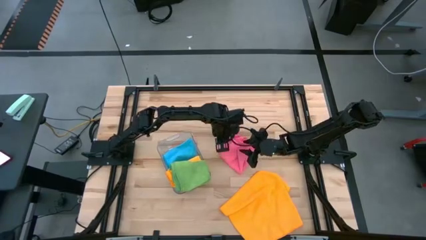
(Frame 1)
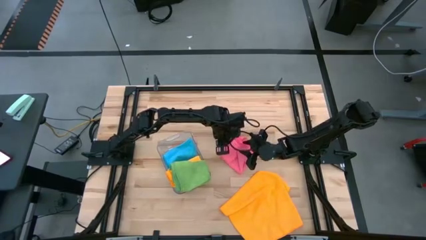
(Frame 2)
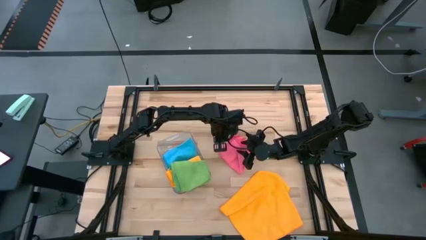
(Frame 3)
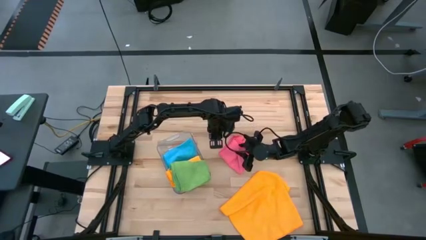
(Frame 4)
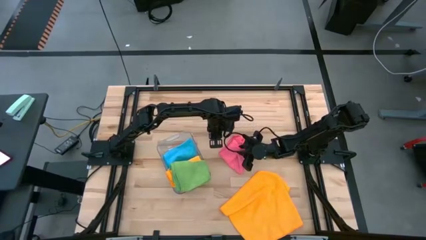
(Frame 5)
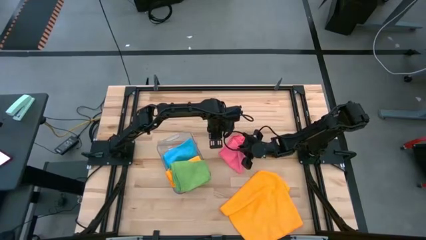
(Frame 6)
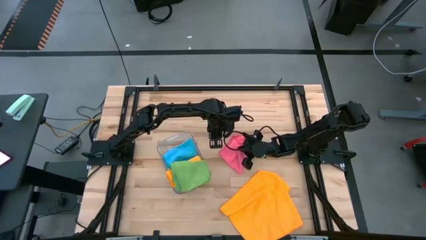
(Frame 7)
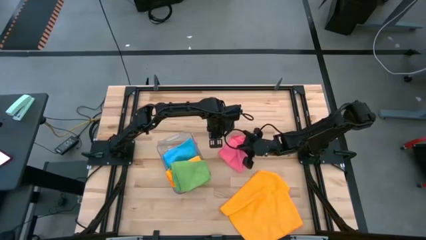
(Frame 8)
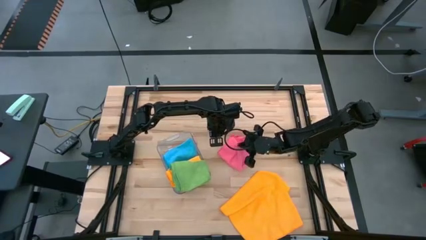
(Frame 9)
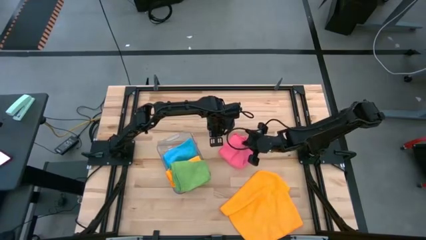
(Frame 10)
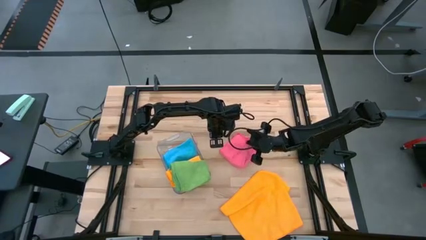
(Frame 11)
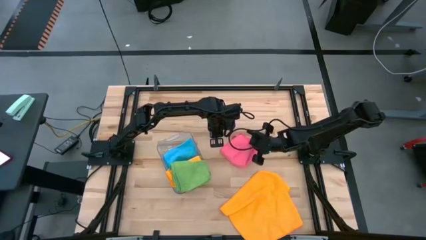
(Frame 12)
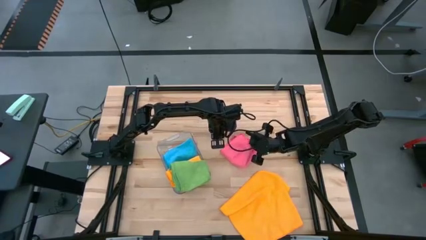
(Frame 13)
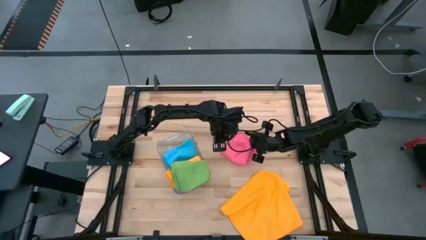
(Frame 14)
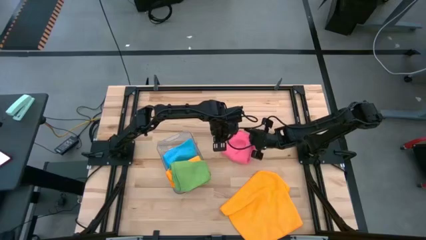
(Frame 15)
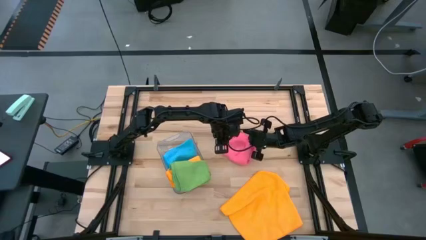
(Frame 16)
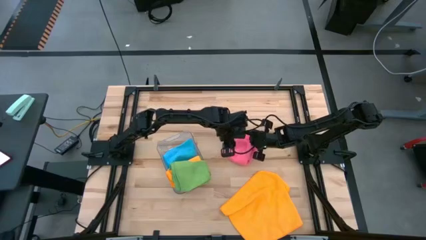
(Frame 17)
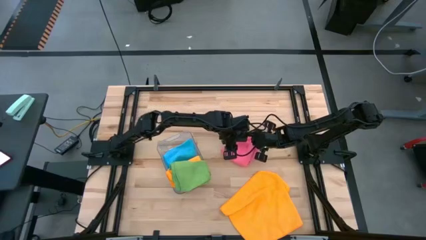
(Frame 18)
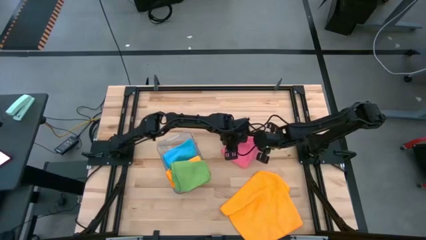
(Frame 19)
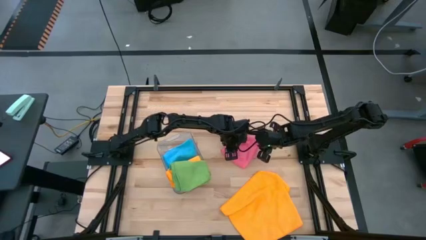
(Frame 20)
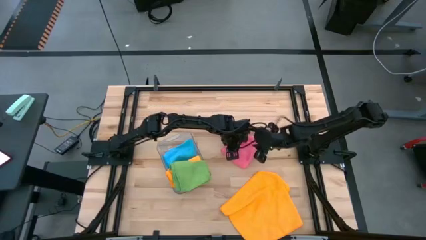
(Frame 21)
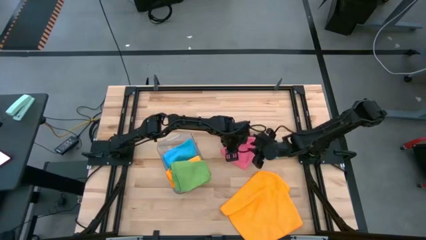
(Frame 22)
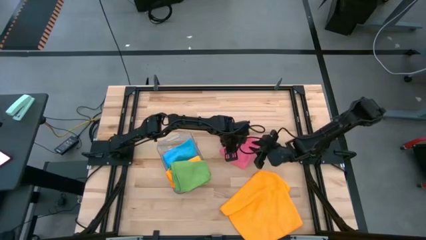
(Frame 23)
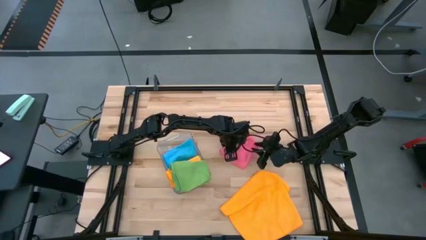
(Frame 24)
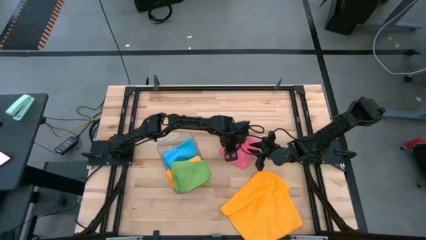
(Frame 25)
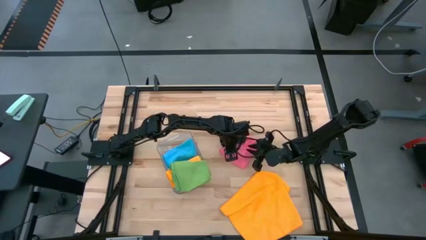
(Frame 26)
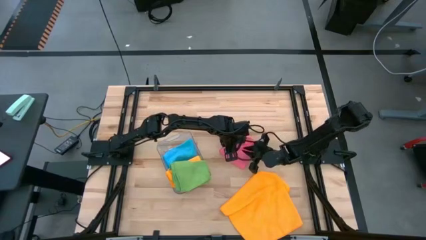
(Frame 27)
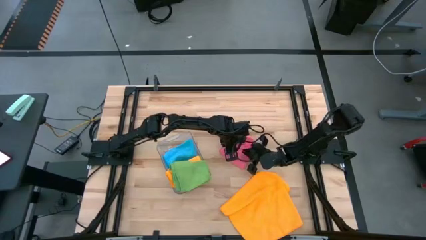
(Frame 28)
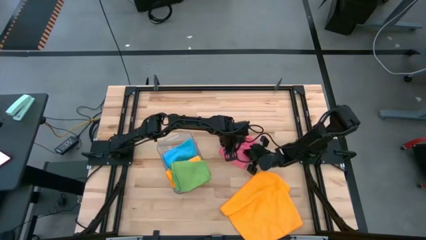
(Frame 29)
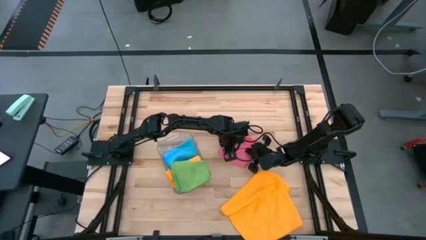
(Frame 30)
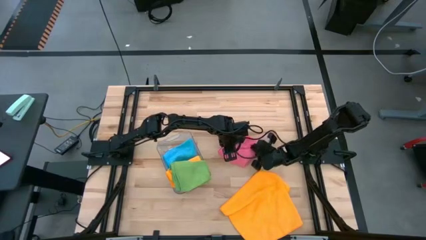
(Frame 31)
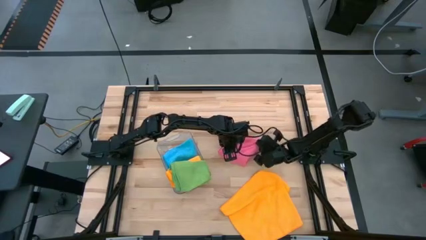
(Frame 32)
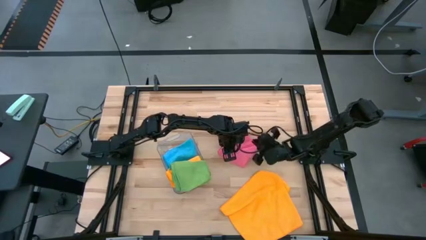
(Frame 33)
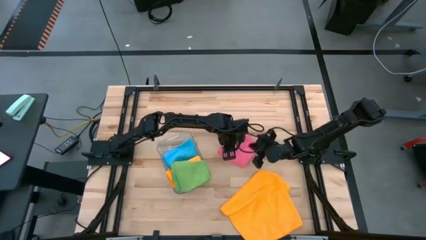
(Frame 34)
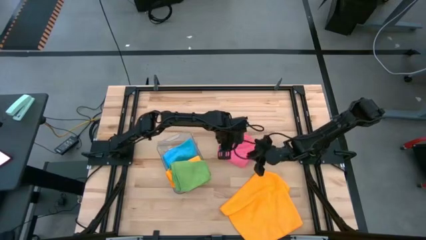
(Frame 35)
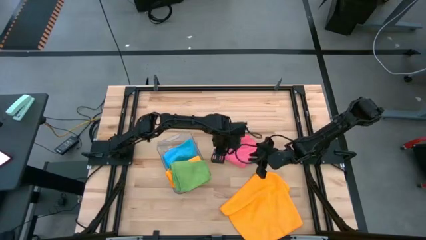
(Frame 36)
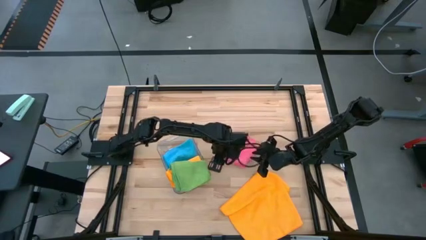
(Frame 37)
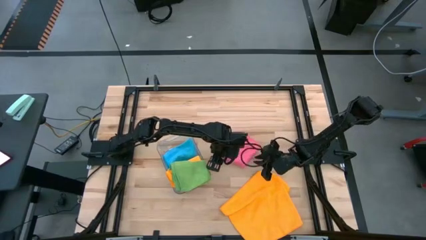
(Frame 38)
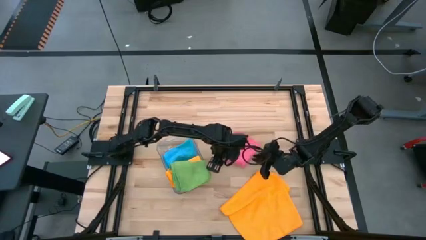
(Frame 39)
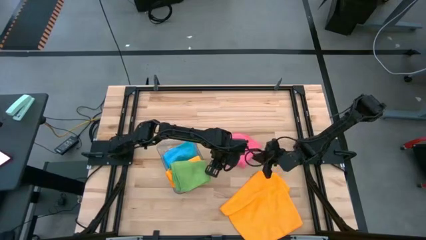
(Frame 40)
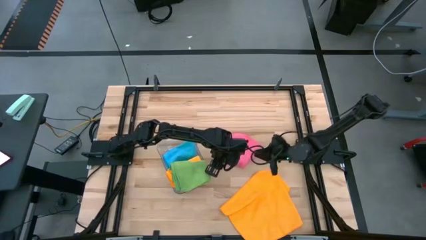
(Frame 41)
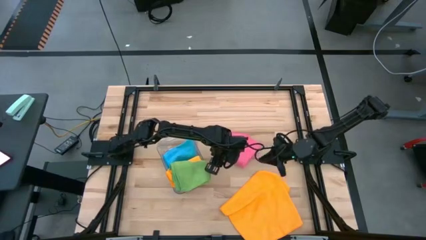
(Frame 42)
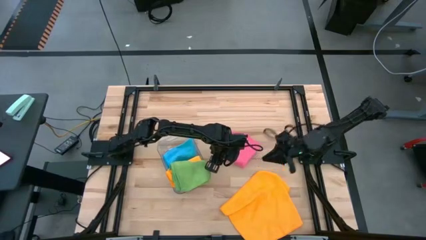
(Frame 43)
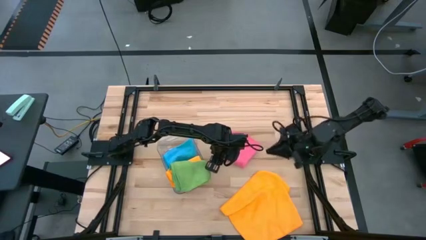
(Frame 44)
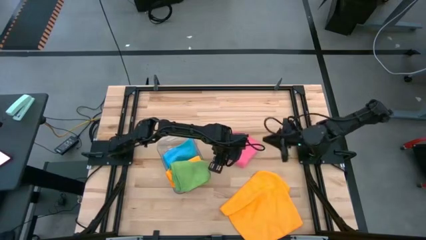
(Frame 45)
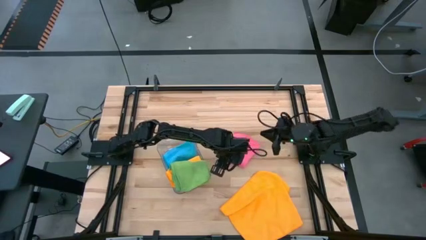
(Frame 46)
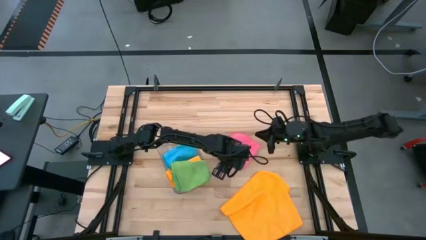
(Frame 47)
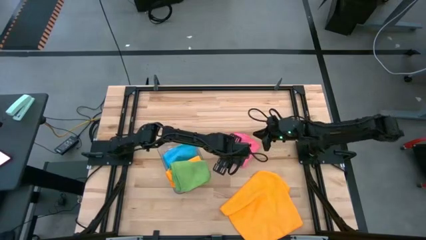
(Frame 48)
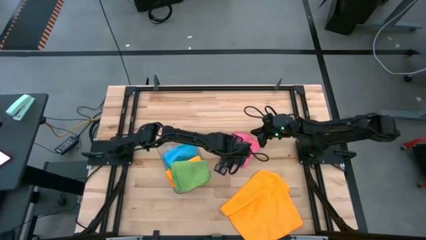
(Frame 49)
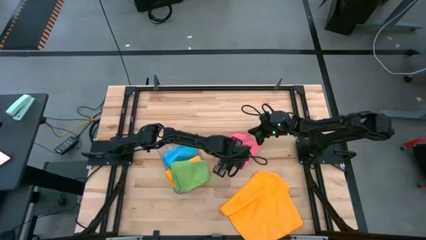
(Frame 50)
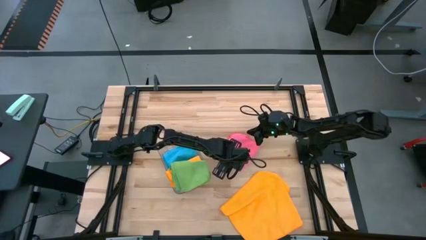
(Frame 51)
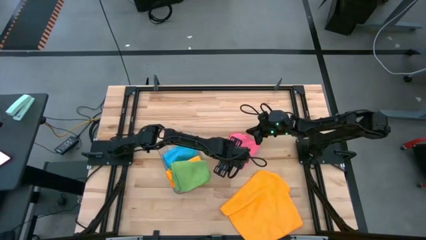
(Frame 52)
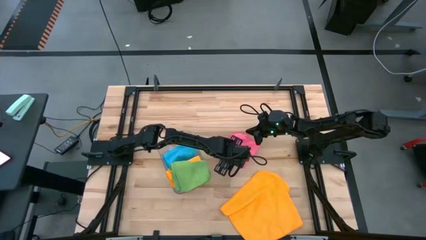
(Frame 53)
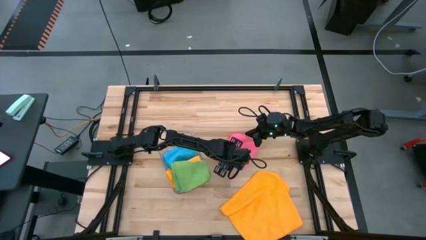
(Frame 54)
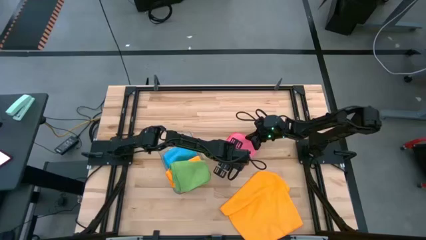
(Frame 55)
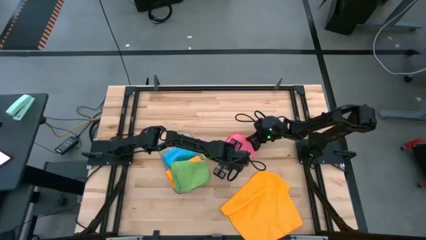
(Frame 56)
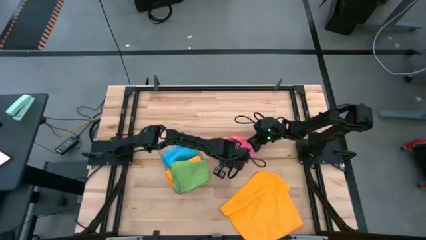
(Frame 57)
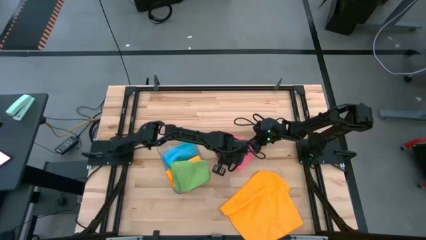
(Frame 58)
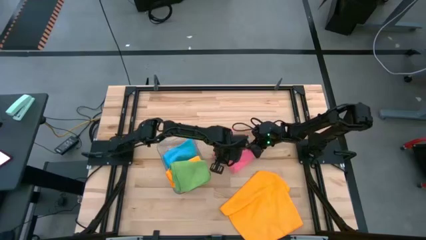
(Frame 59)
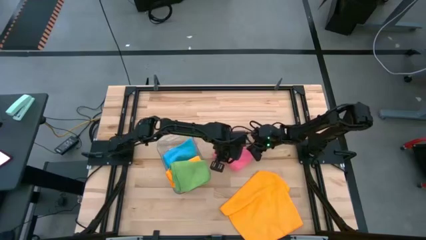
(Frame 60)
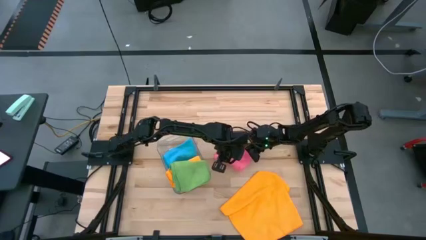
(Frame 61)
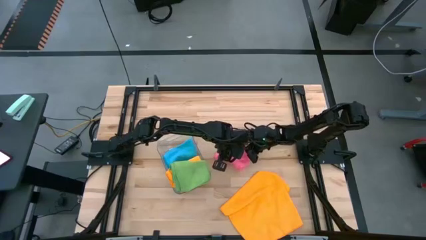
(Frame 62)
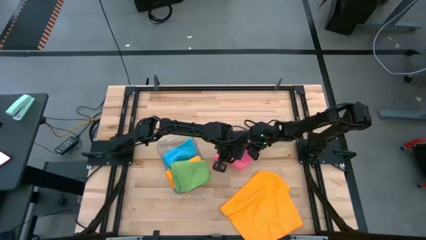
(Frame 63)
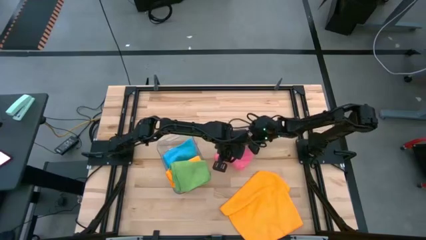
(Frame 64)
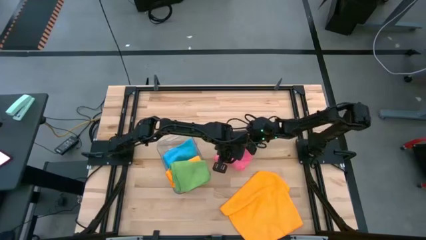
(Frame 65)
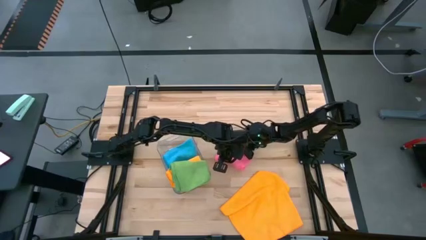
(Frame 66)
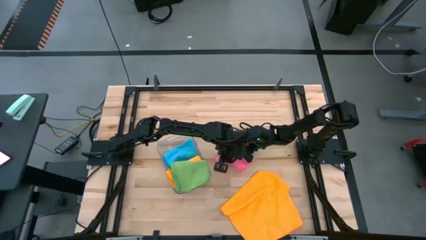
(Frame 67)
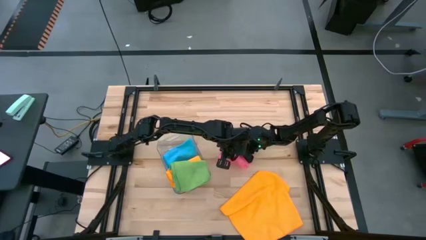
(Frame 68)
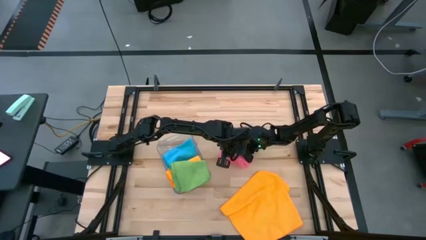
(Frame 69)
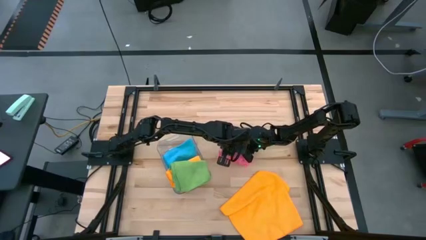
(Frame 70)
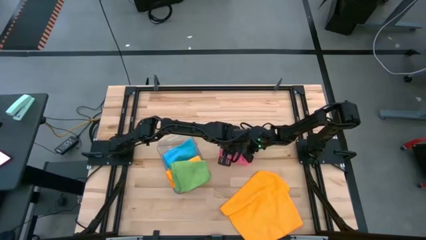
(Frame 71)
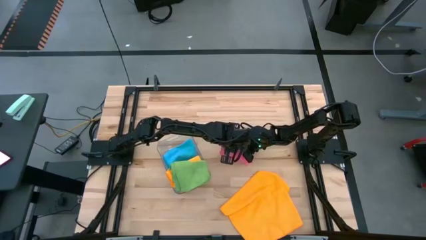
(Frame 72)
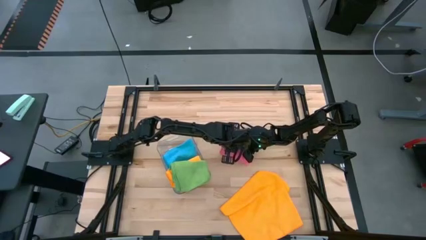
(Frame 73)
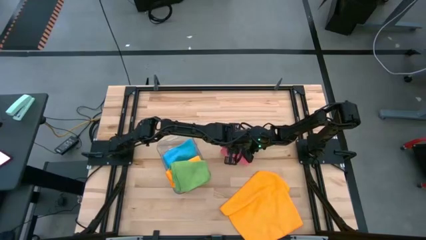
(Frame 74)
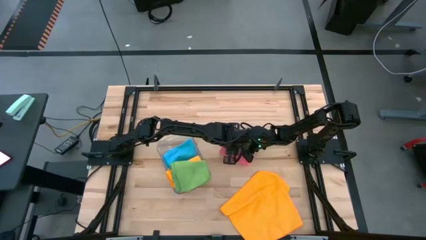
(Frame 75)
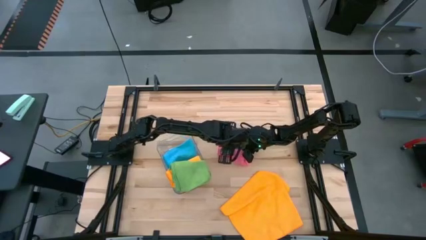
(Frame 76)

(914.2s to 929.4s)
Task: Fold microfiber towels
Fold the pink towel

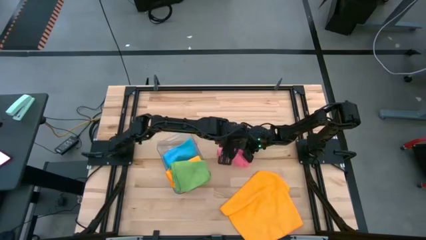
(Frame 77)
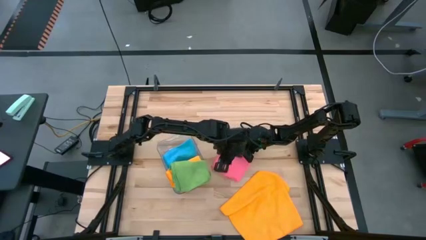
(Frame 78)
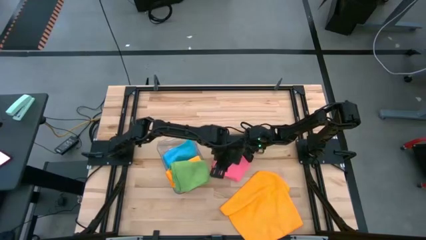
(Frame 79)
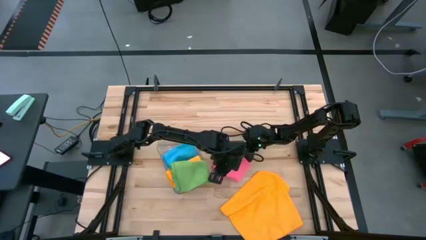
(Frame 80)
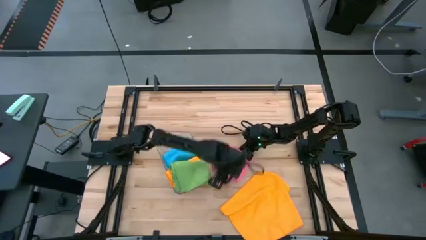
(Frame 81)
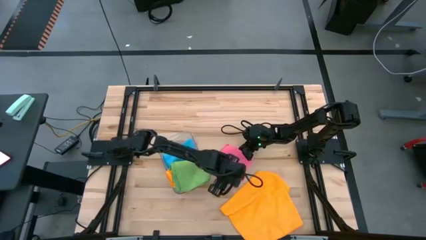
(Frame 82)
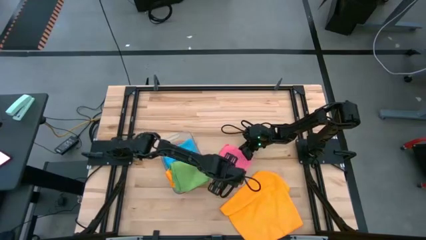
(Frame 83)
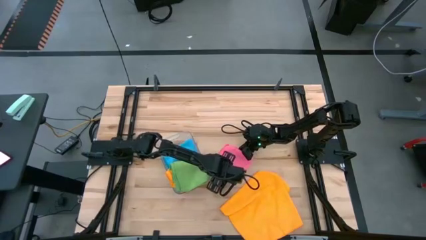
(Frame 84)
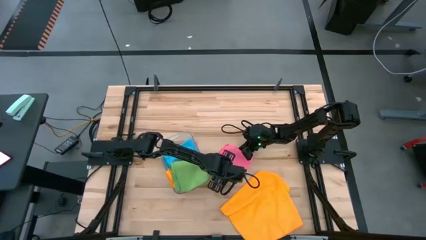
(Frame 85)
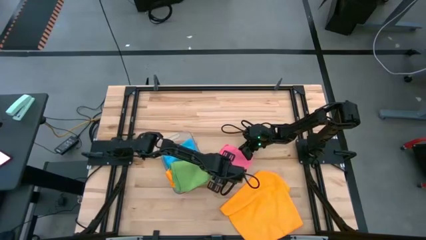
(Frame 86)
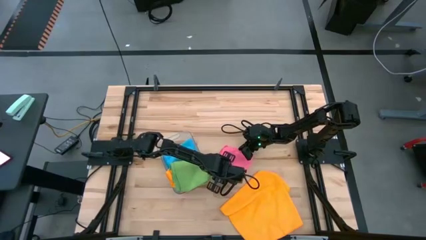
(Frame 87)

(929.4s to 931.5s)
Fold the pink towel
